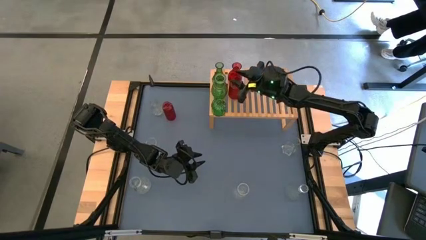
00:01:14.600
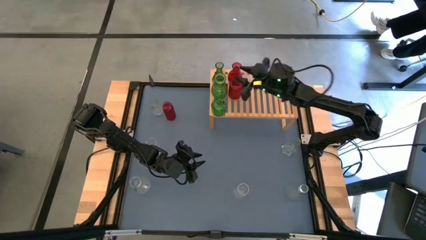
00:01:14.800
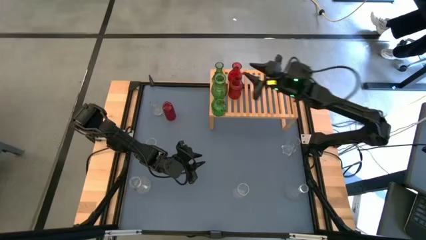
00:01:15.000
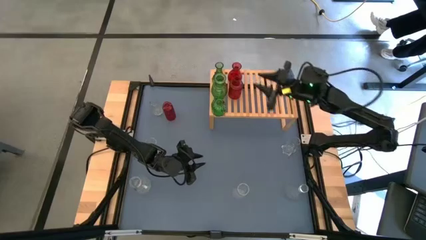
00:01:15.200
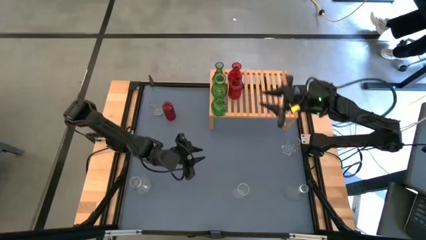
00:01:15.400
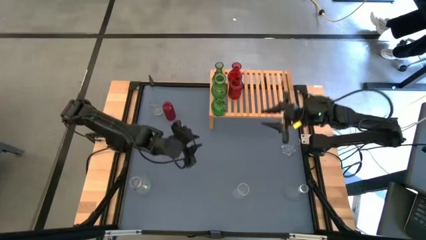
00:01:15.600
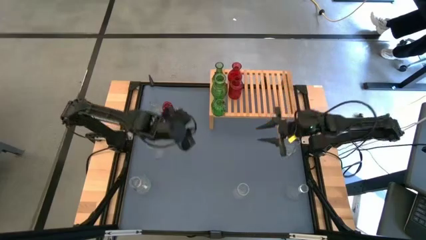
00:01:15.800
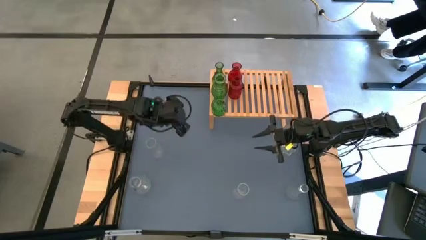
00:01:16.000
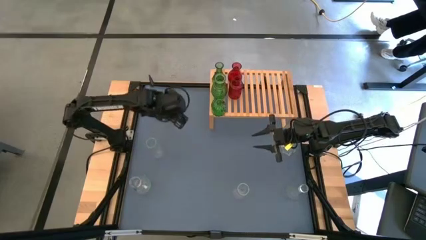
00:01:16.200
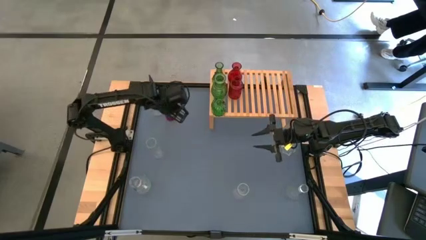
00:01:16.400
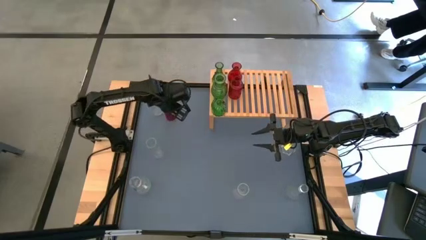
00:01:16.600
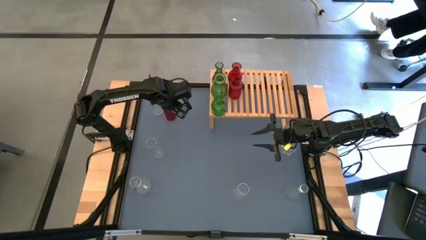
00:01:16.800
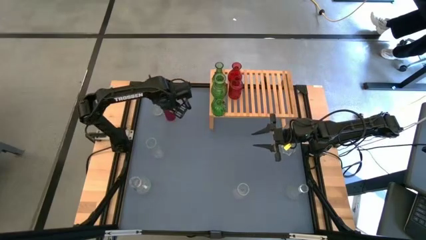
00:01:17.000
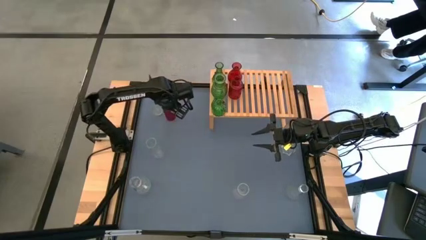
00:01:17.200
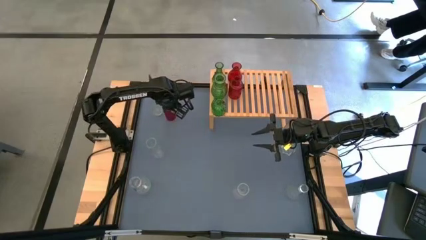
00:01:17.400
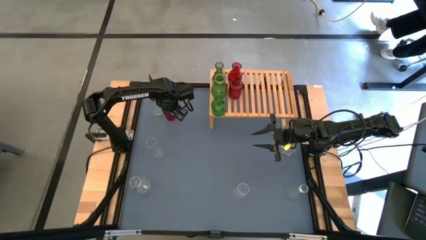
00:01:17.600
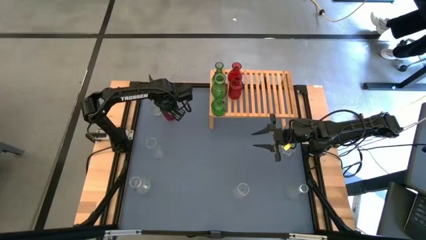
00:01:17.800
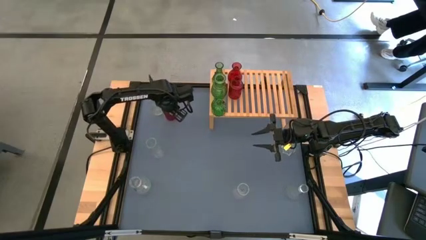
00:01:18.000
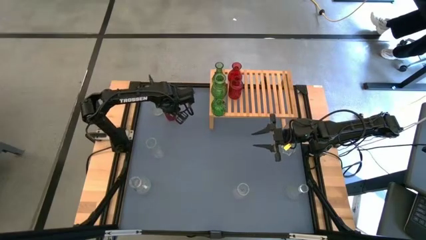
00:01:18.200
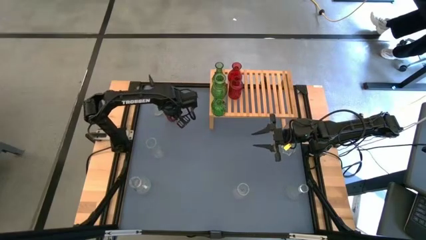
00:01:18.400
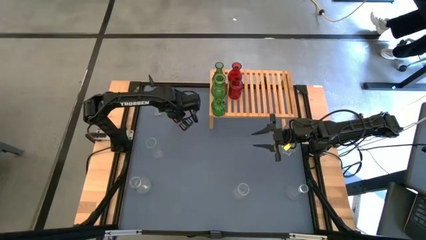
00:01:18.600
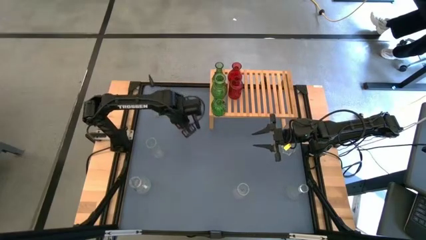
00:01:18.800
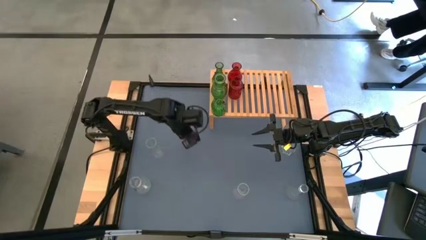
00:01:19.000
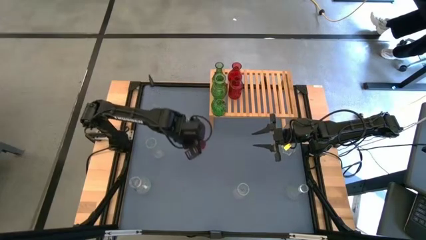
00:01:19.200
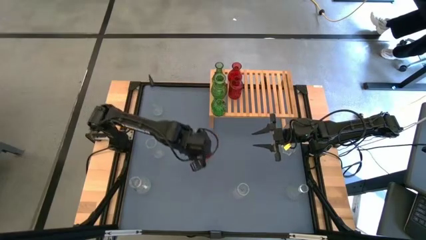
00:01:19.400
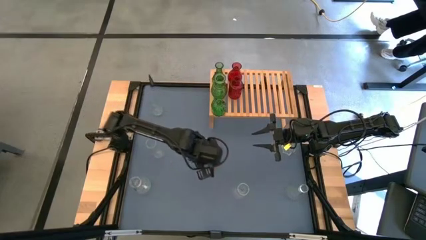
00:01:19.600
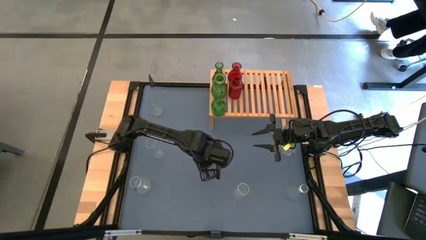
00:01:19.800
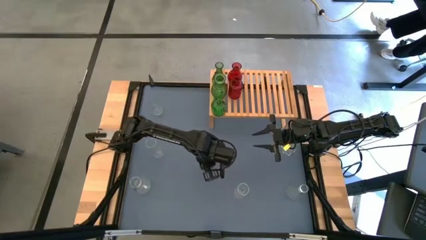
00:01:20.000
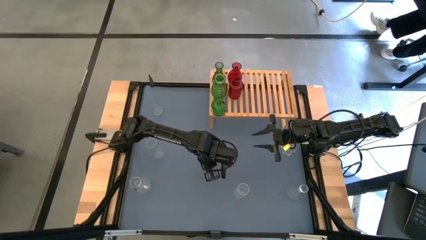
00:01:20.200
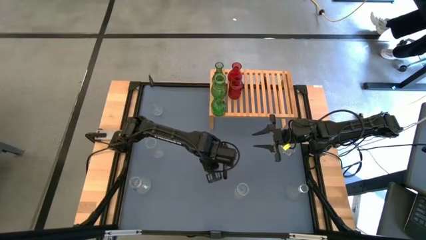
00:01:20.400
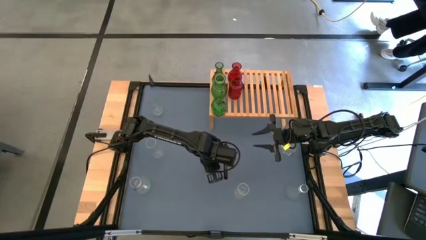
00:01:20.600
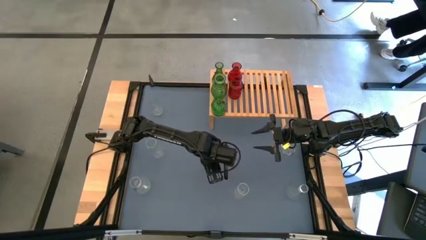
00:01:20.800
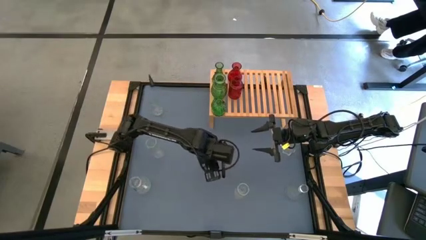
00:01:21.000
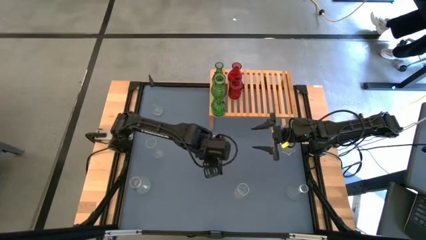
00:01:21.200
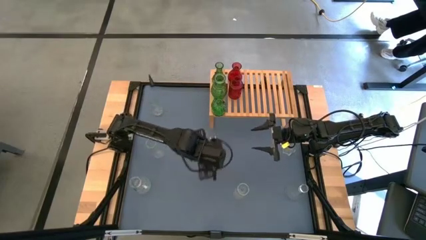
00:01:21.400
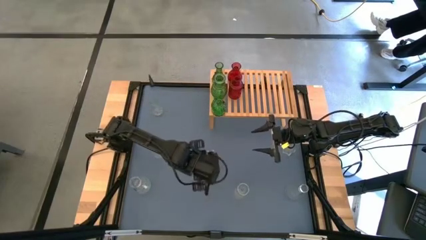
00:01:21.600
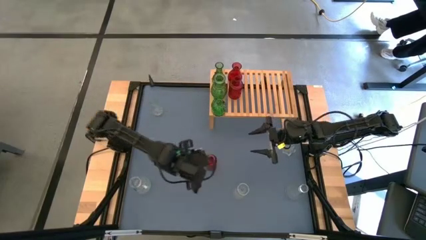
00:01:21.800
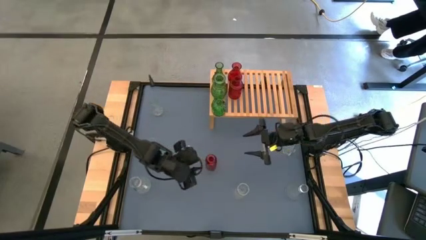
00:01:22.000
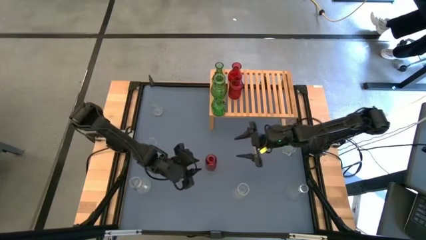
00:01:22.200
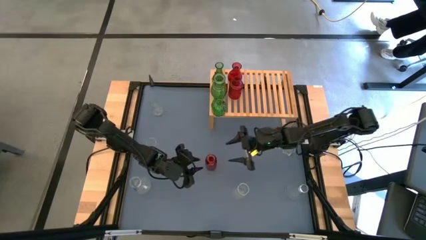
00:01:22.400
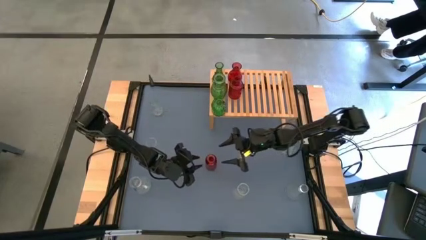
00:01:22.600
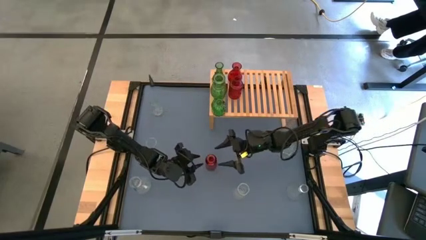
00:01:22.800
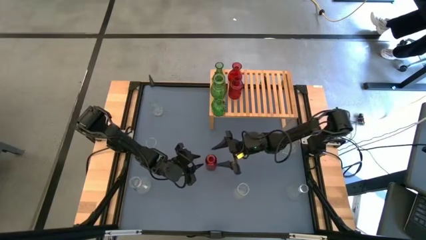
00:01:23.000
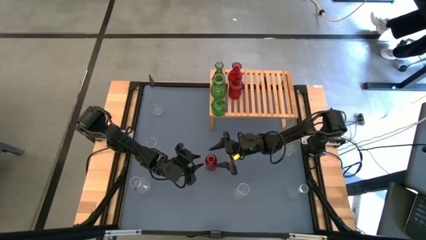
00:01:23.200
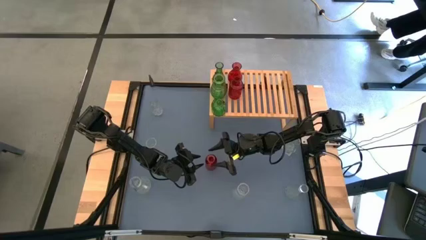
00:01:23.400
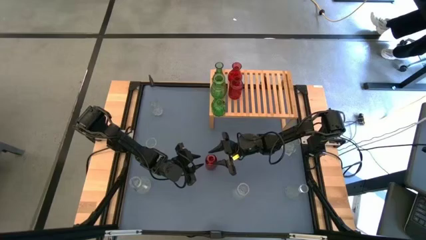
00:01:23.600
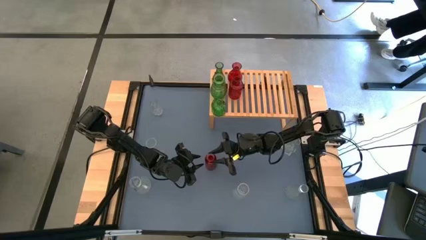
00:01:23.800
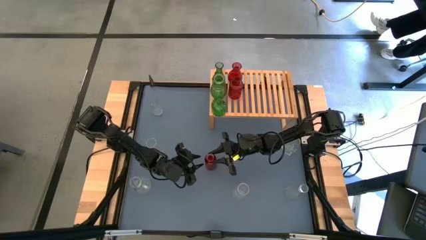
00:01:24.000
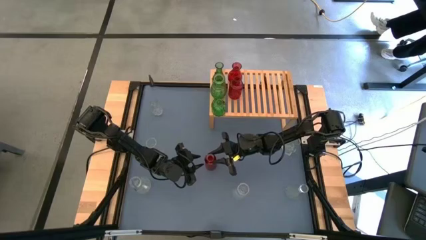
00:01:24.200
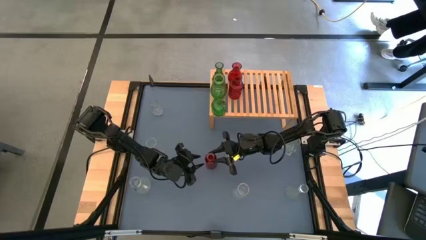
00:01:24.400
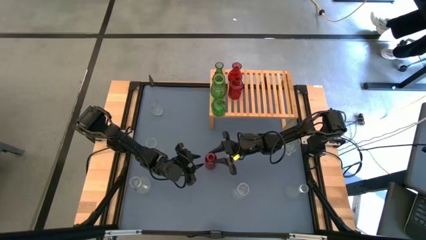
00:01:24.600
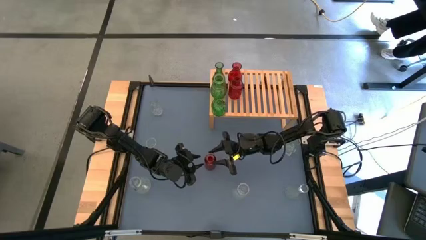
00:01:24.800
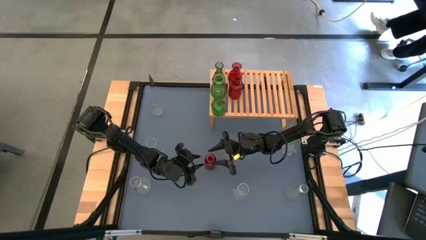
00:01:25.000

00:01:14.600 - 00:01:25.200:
Task: sort vases onto shelf
Put the red vase on the shelf, aligned with the other red vases

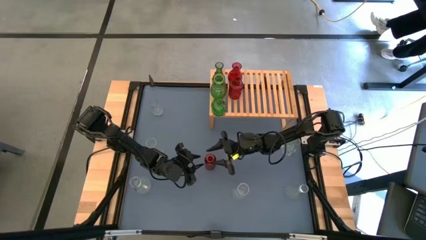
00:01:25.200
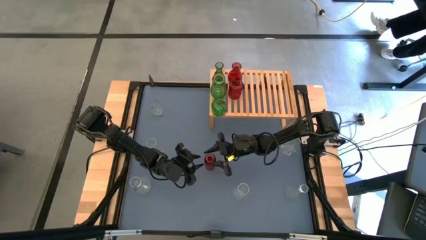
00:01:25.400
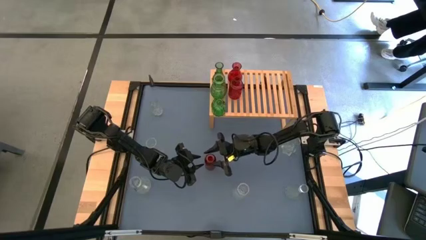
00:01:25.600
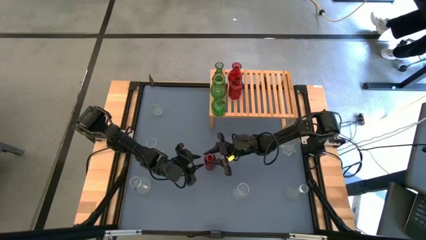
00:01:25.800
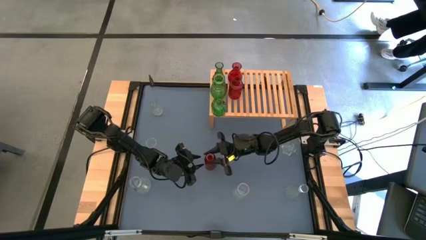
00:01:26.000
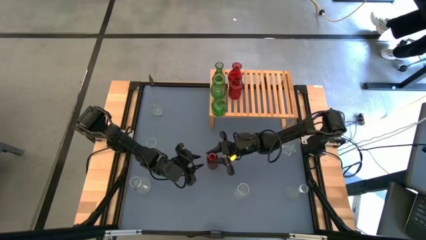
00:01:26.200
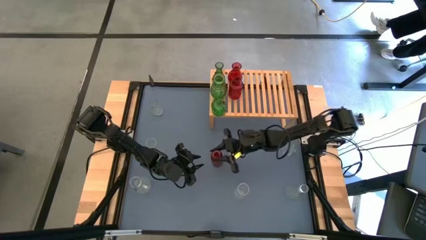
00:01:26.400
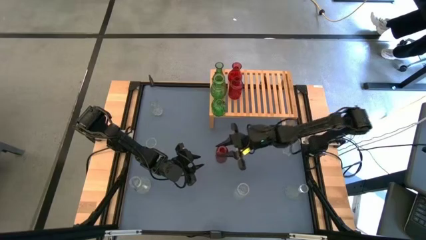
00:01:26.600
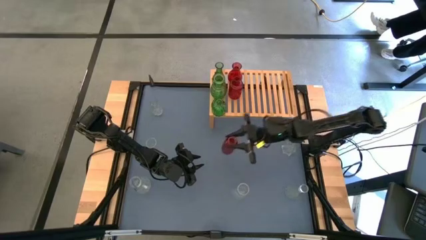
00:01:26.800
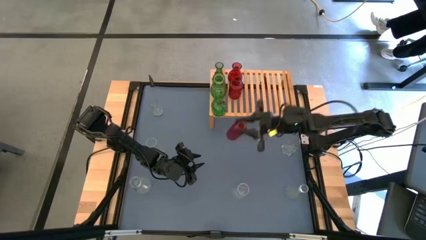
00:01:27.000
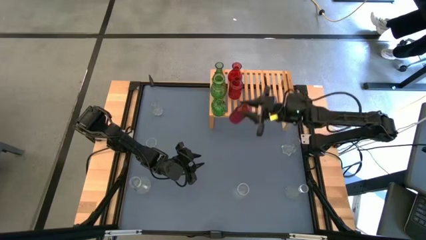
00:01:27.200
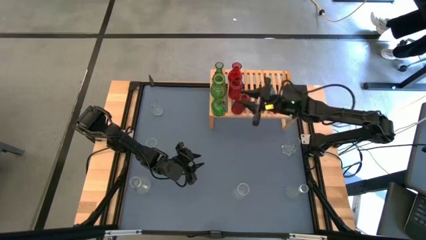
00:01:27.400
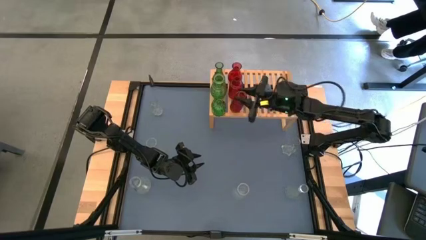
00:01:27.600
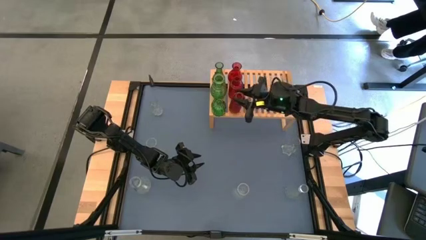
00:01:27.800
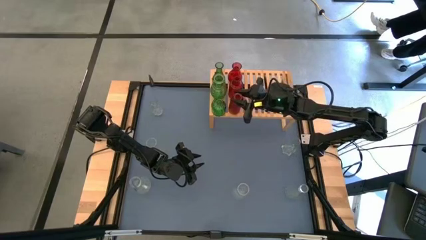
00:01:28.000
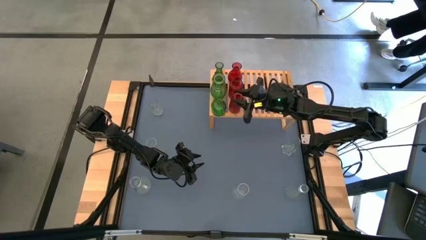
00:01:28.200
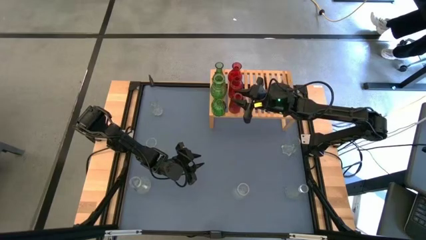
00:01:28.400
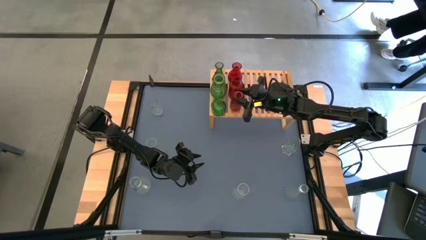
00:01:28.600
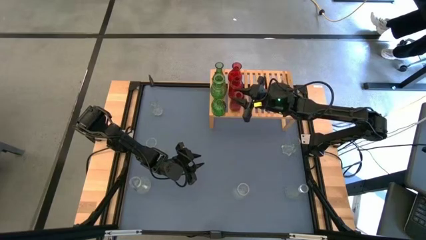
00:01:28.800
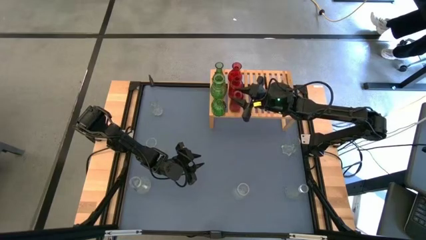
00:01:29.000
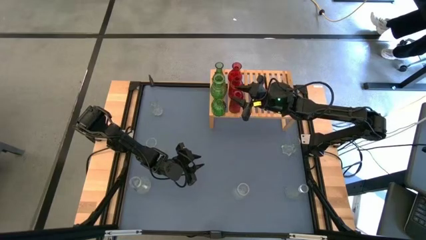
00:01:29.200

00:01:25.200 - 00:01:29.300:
Put the red vase on the shelf, aligned with the other red vases
